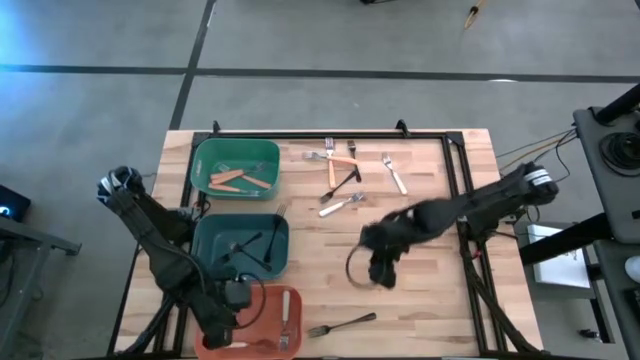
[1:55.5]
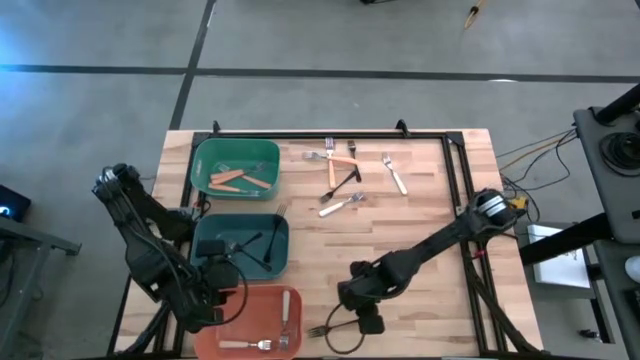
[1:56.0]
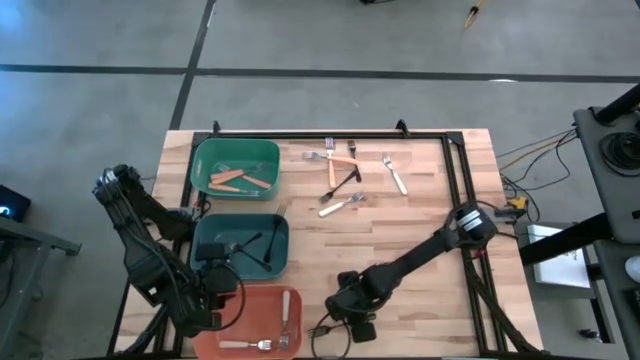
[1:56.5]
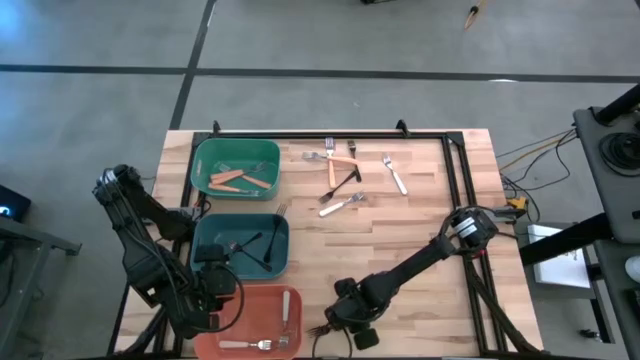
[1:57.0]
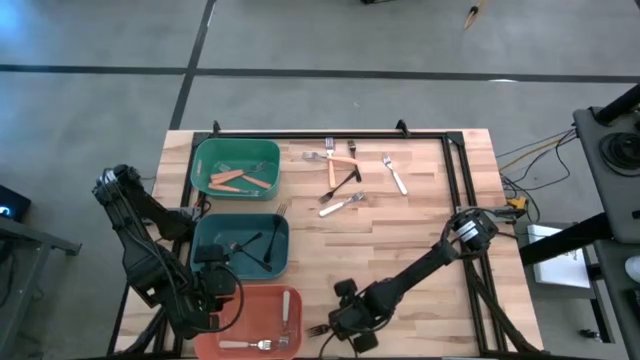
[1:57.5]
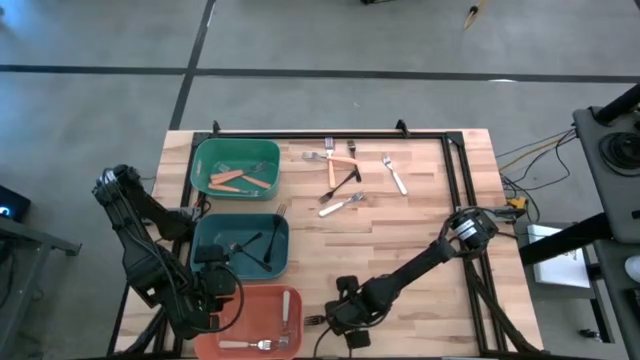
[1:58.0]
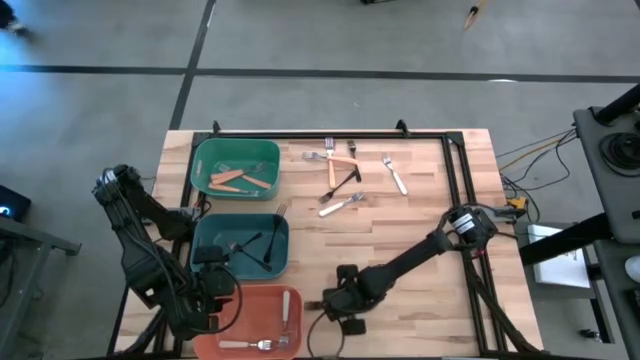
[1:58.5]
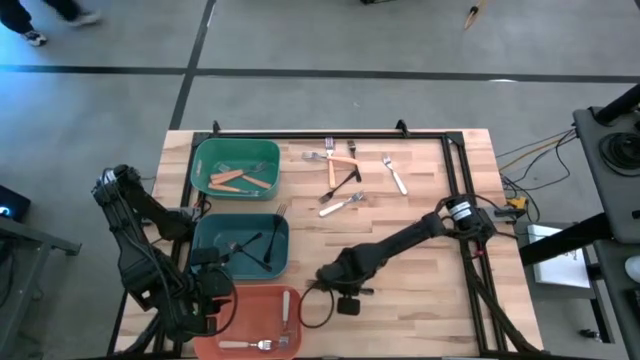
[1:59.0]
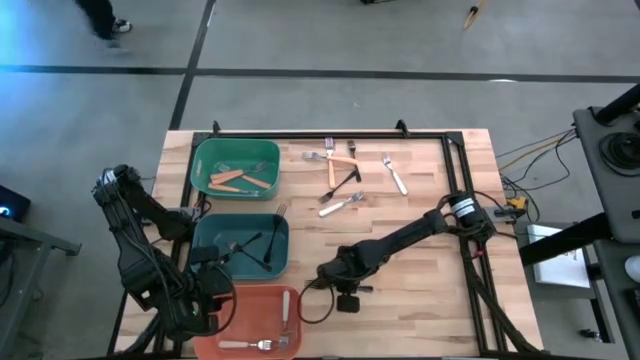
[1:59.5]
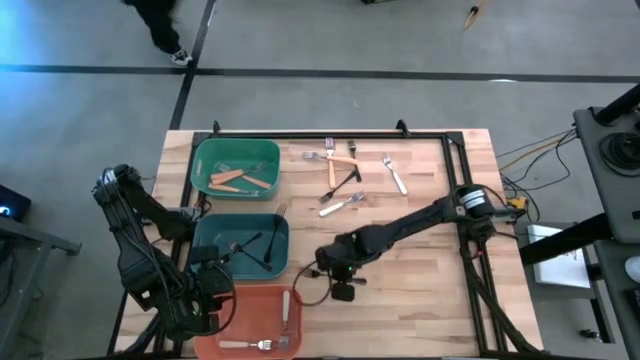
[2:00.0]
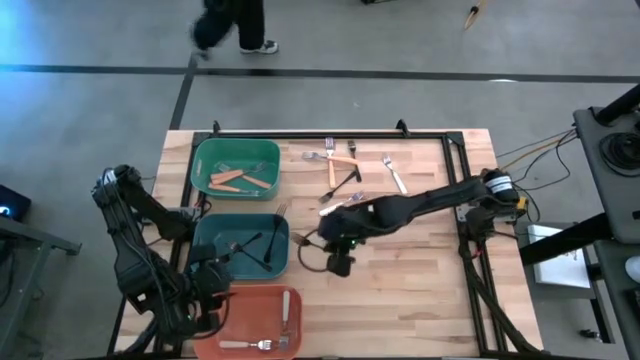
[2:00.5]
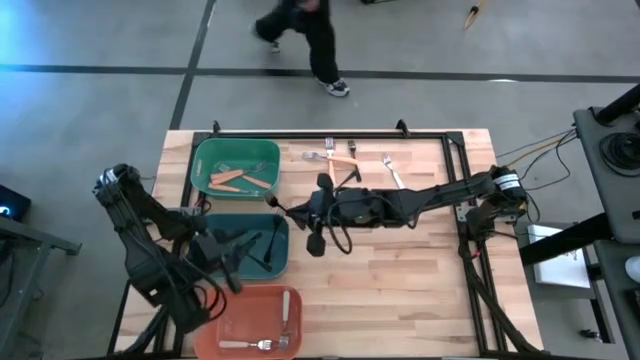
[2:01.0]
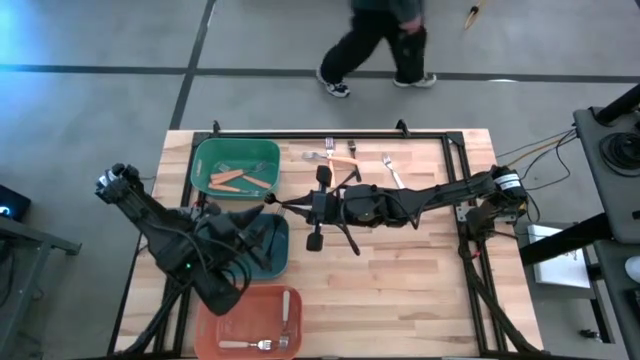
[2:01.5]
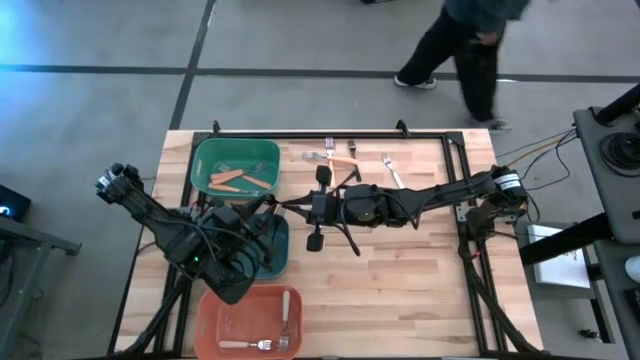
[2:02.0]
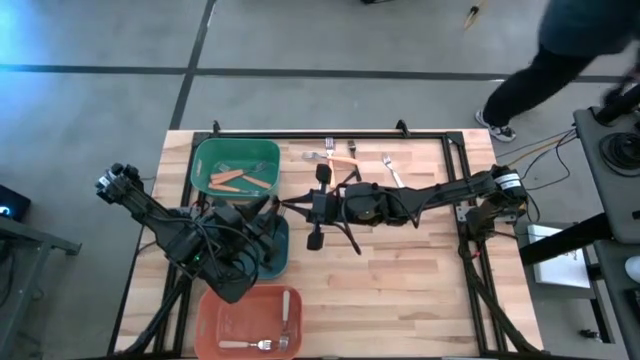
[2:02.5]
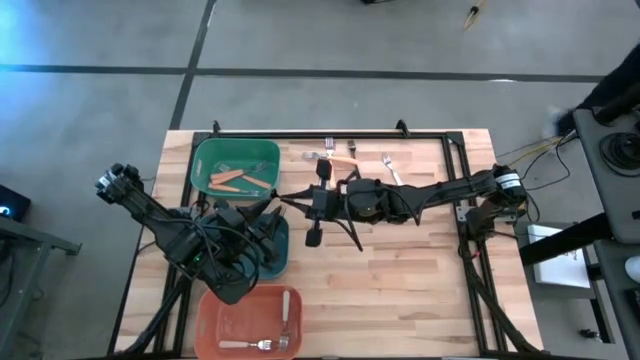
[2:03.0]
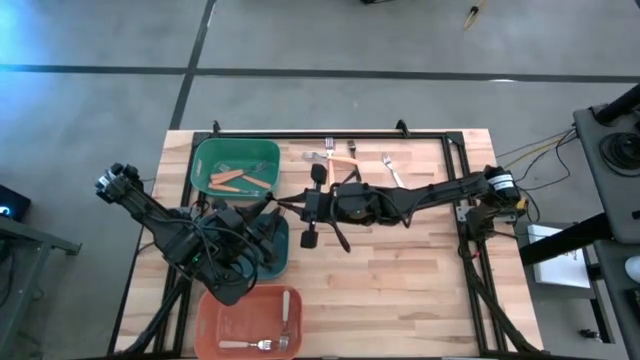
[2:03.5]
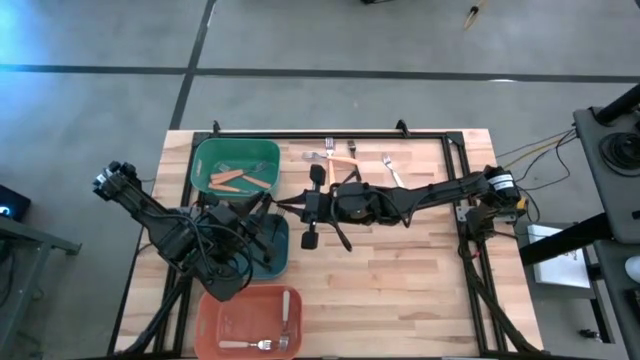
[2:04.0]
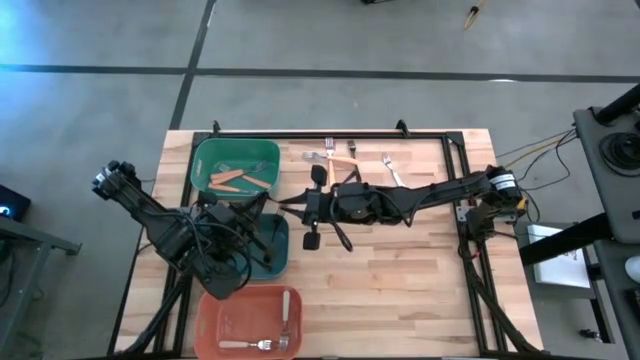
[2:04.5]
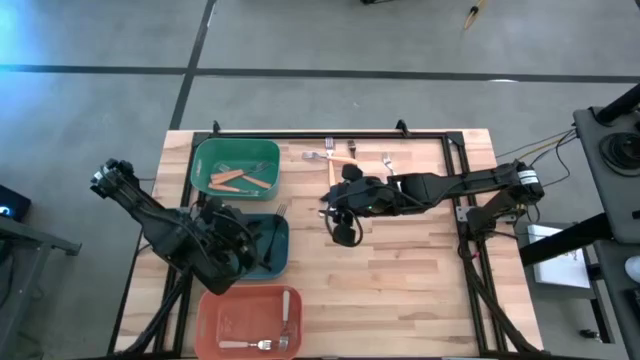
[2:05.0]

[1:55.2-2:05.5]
Task: Sort silverware by color (type)
Put the black fork into the blue bin

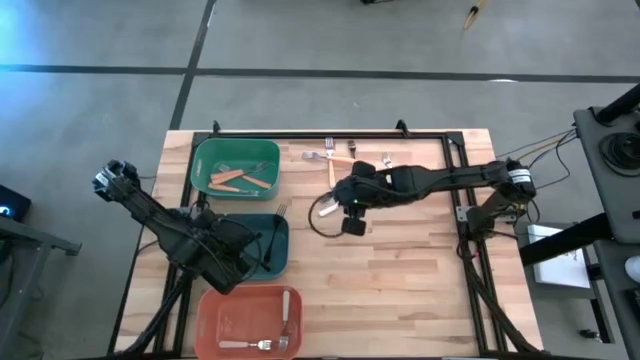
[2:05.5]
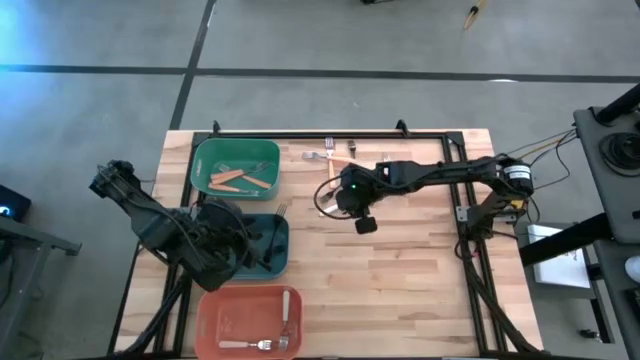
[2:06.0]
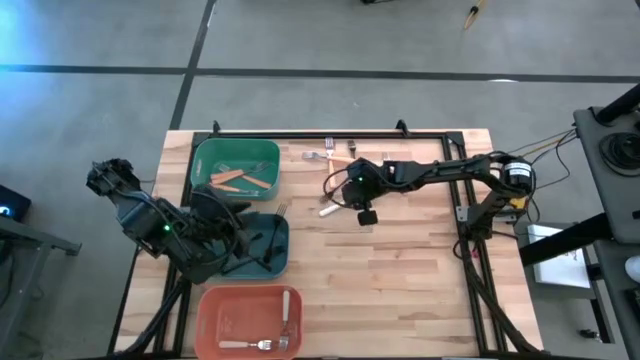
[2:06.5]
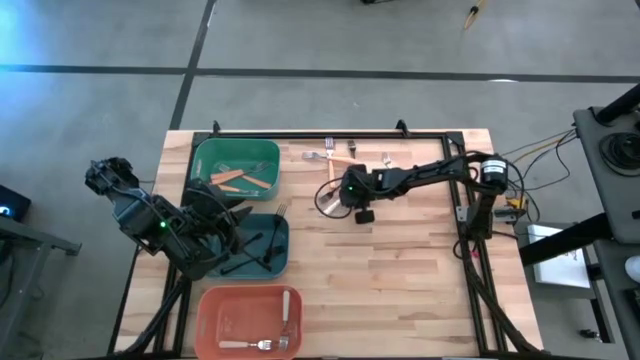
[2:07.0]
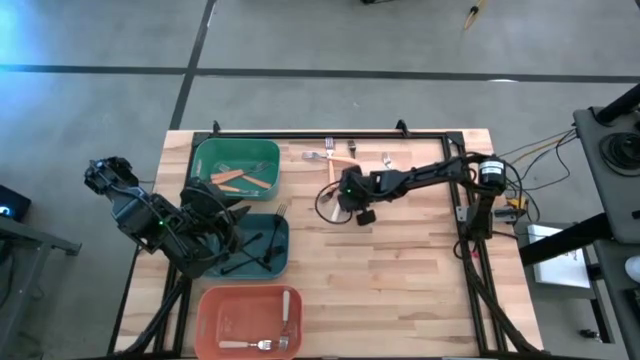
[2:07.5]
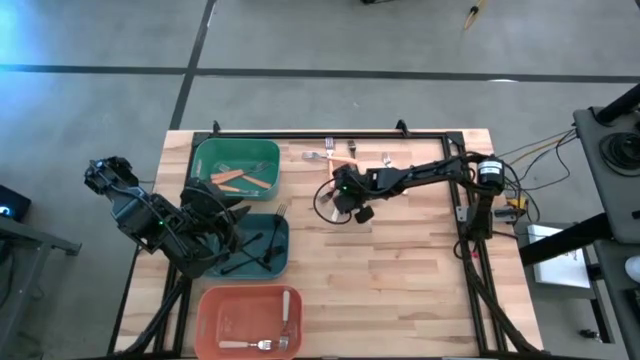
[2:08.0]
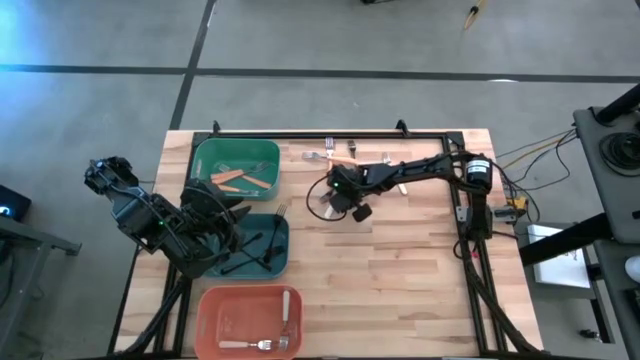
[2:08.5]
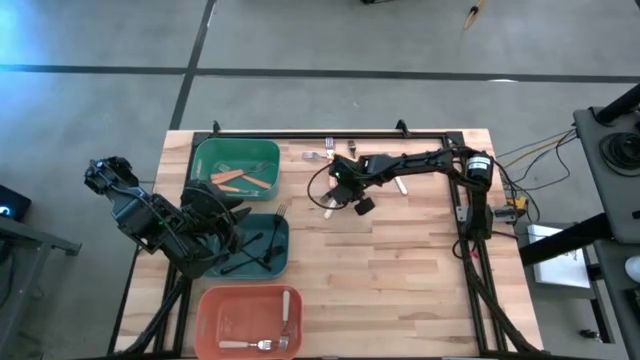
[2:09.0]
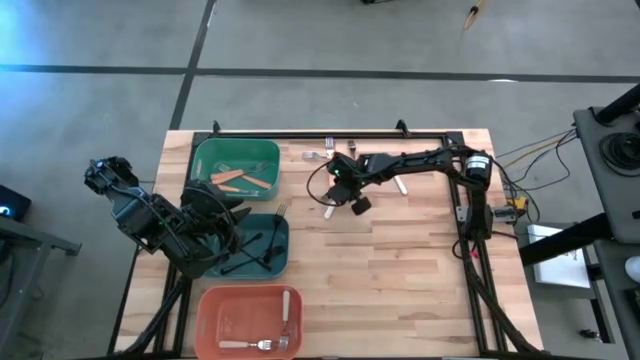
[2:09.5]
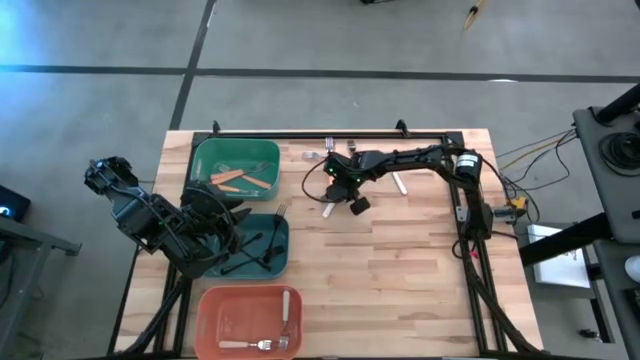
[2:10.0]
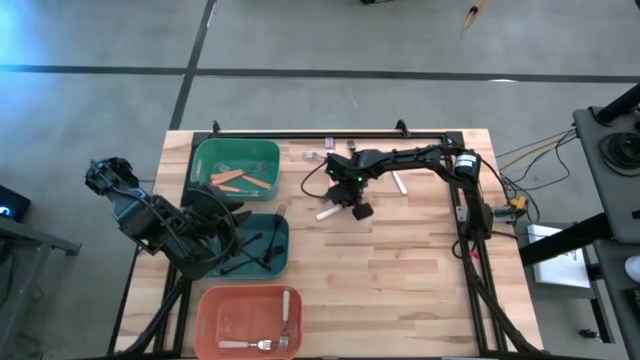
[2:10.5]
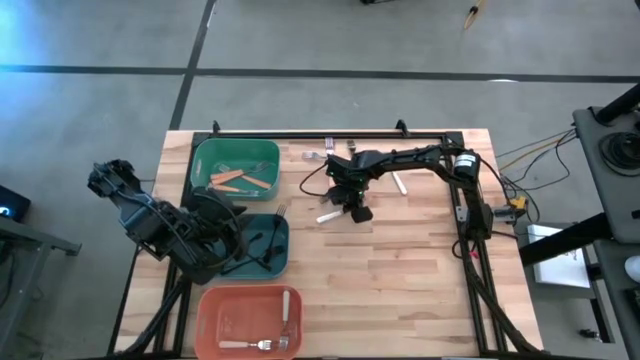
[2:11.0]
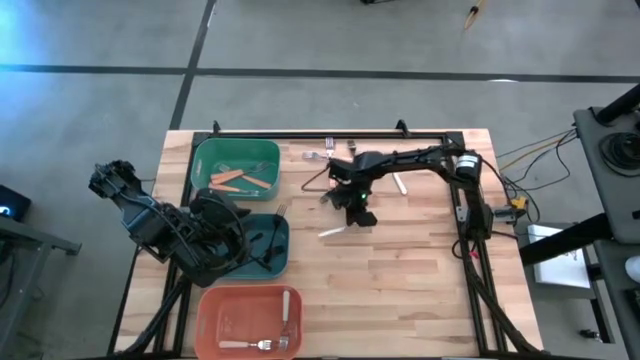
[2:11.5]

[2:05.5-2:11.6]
Put the white fork into the orange bin

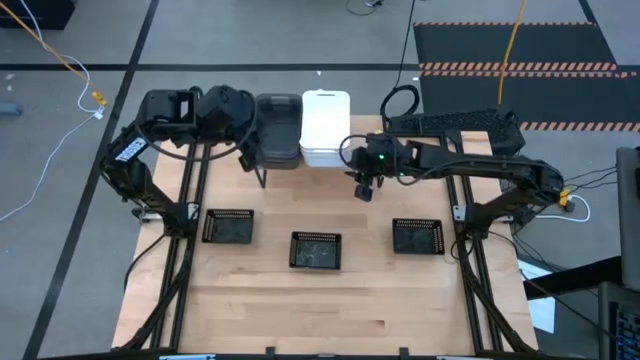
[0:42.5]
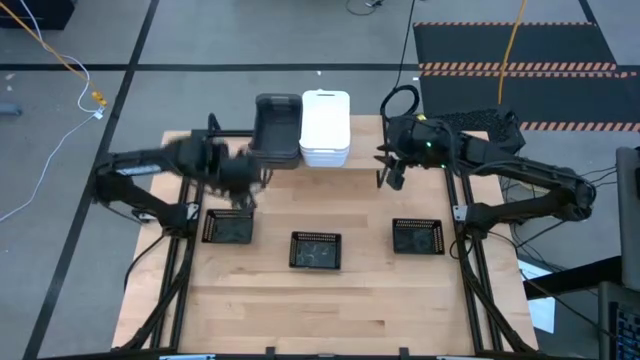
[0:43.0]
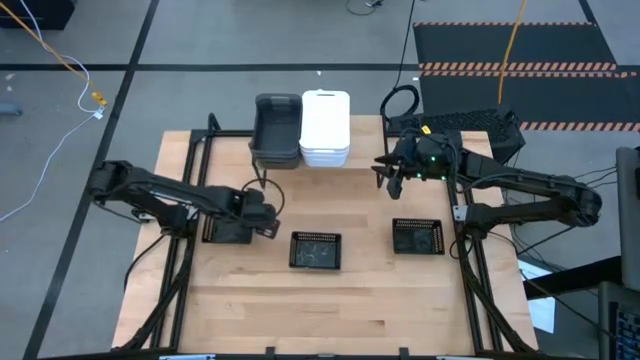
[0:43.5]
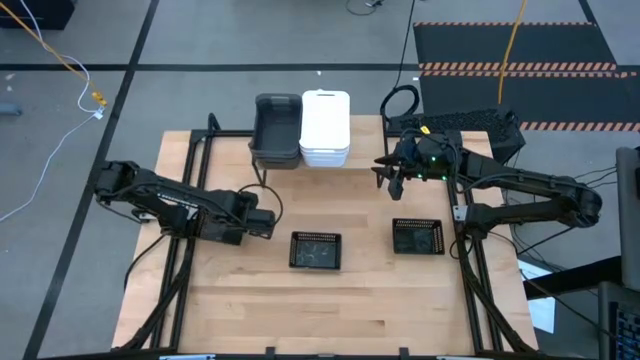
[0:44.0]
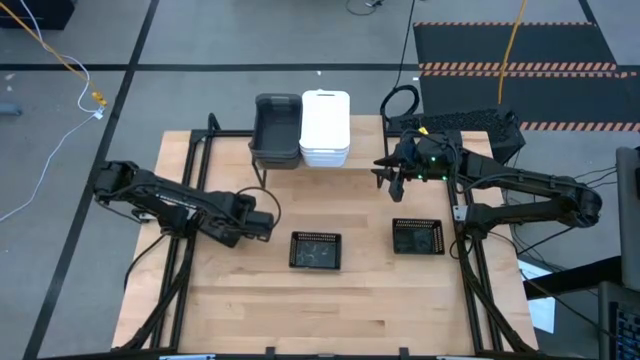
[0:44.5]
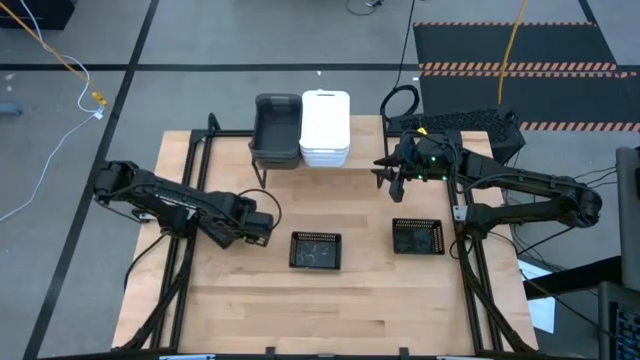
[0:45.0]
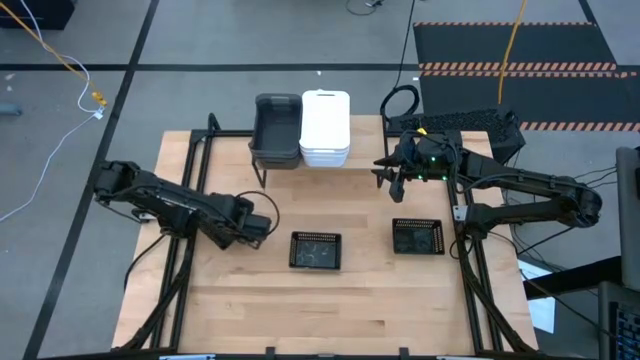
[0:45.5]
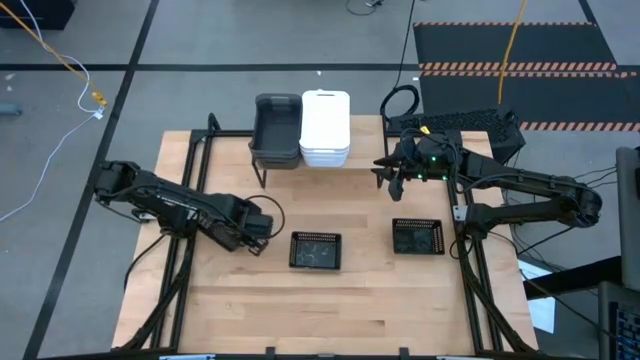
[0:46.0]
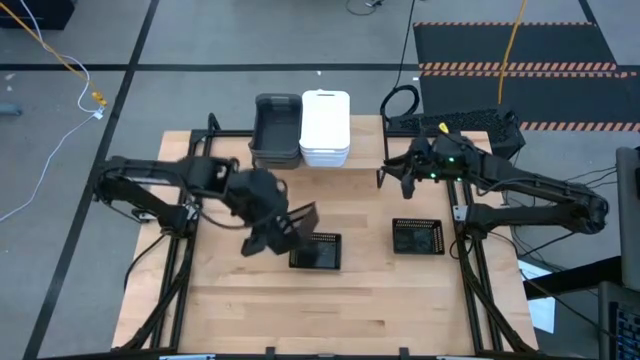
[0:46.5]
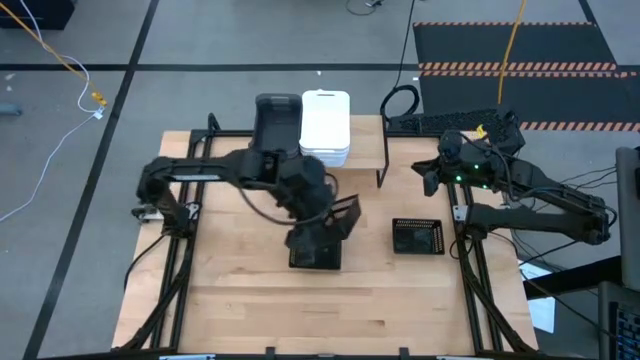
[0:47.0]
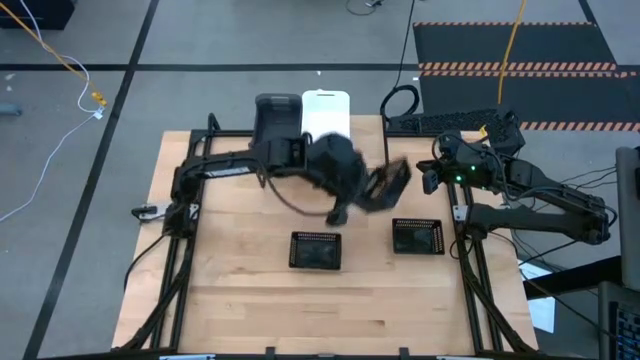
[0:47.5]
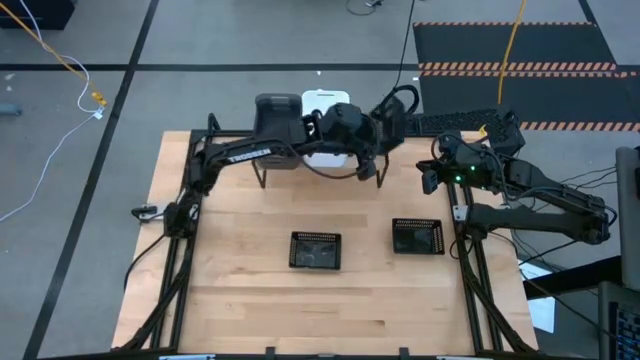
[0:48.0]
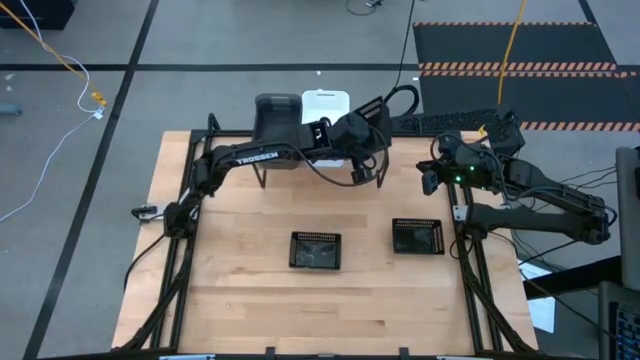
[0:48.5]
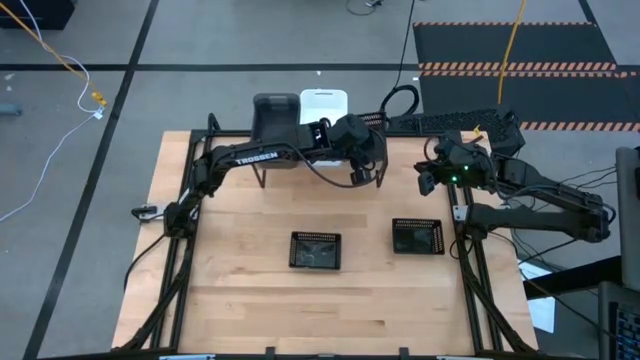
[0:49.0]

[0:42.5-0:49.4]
Task: Stack baskets on shelf by color
Put the left black bin on the shelf
